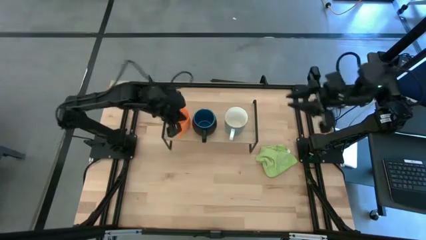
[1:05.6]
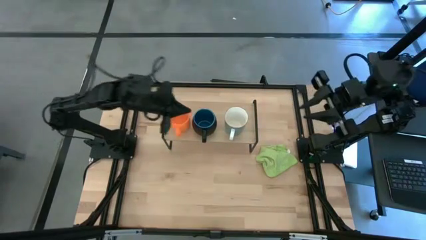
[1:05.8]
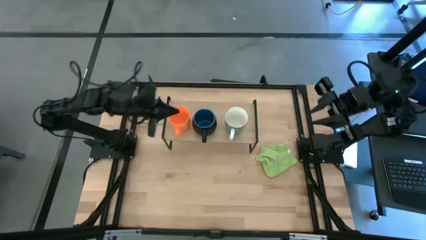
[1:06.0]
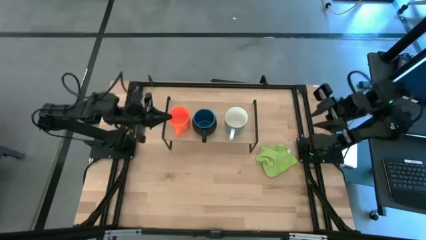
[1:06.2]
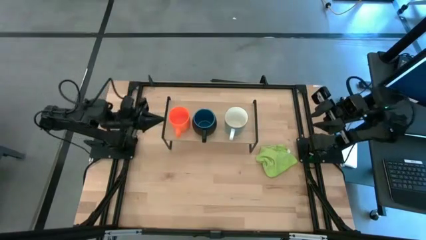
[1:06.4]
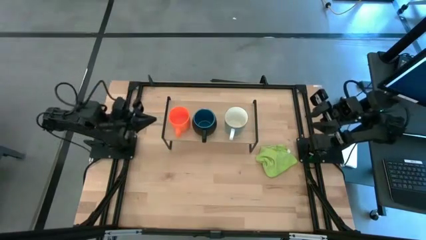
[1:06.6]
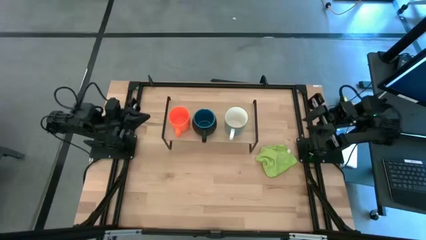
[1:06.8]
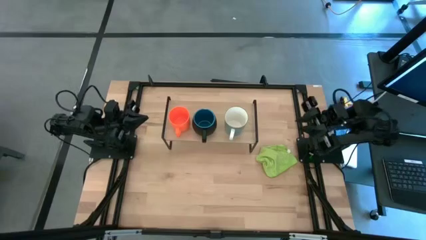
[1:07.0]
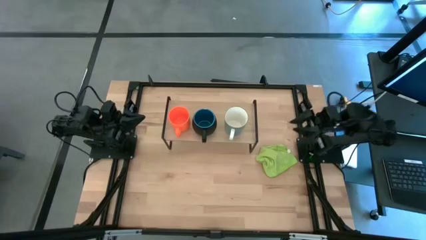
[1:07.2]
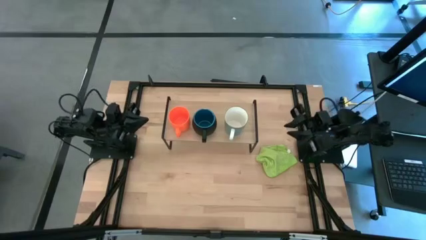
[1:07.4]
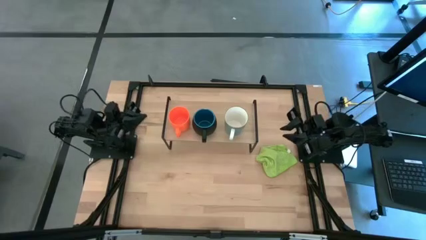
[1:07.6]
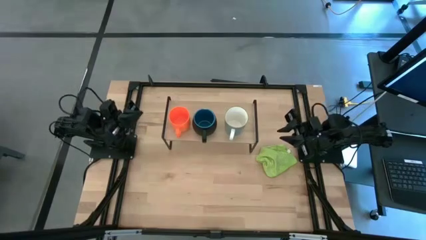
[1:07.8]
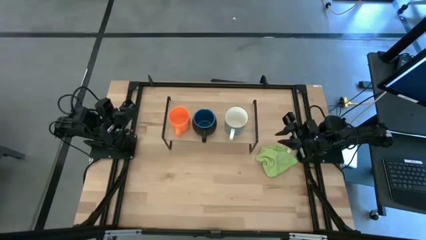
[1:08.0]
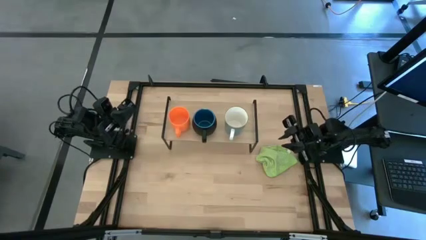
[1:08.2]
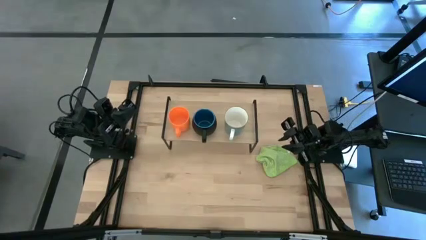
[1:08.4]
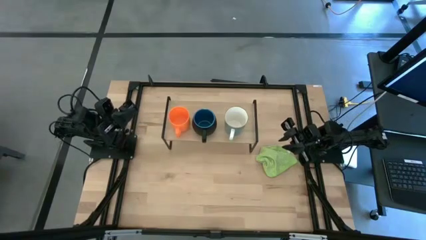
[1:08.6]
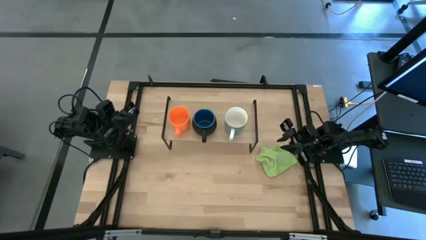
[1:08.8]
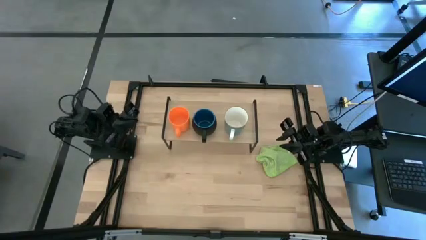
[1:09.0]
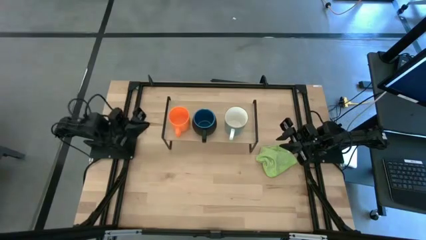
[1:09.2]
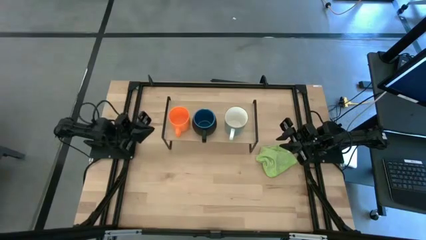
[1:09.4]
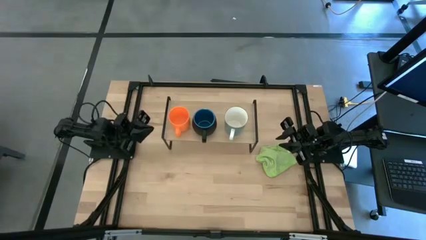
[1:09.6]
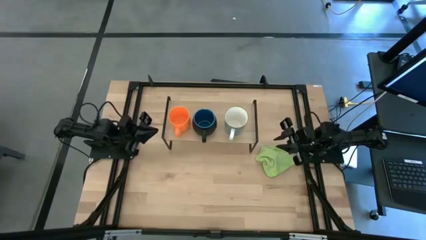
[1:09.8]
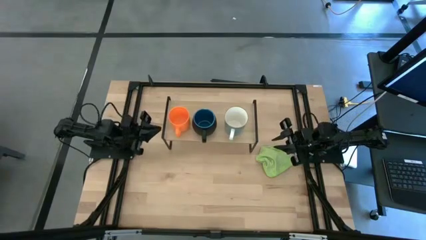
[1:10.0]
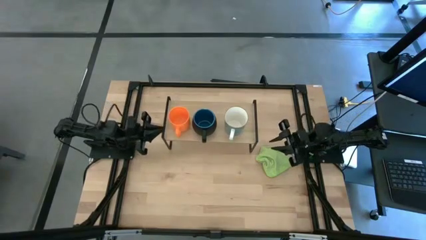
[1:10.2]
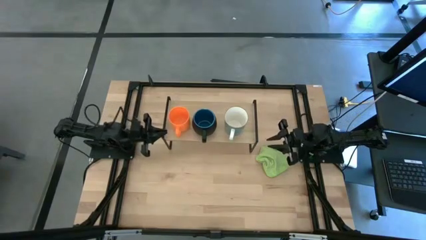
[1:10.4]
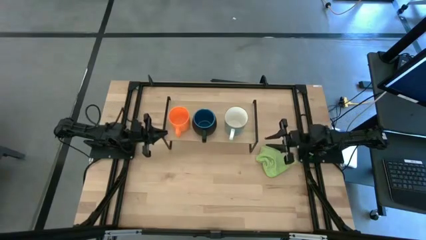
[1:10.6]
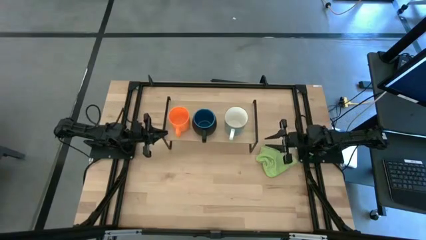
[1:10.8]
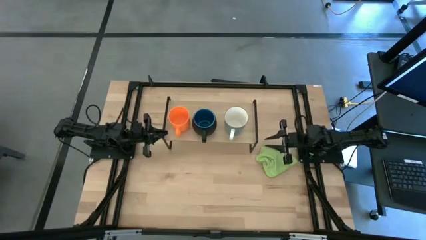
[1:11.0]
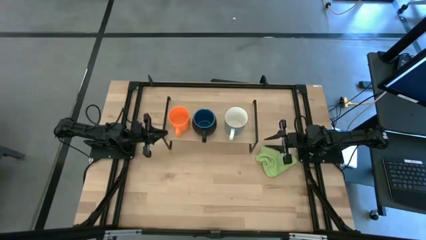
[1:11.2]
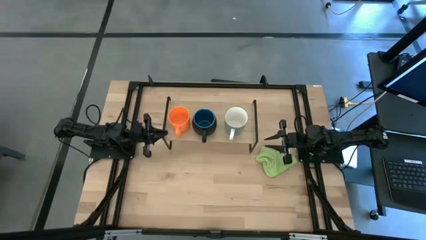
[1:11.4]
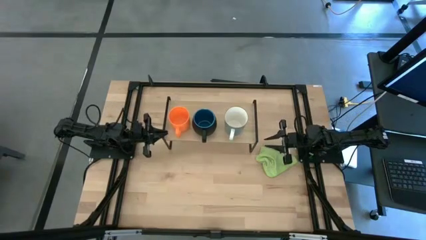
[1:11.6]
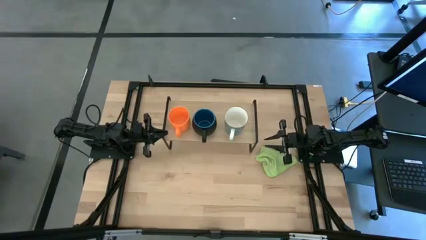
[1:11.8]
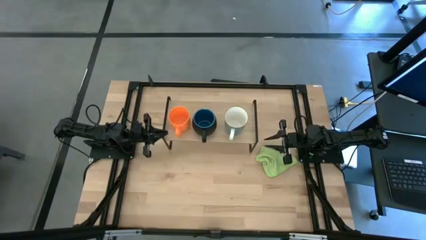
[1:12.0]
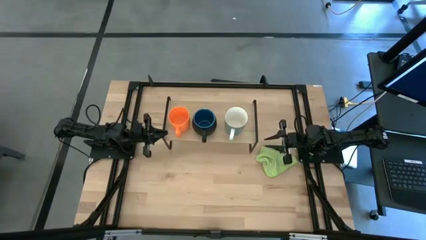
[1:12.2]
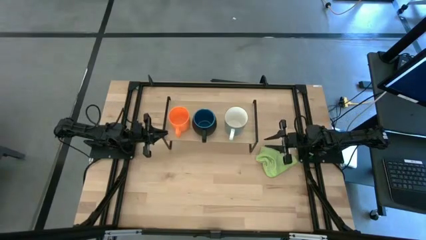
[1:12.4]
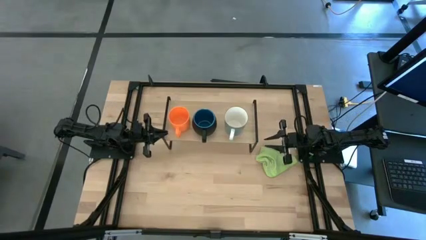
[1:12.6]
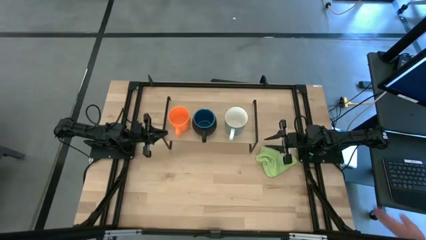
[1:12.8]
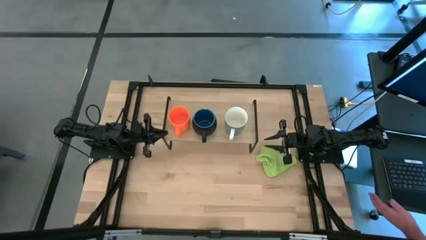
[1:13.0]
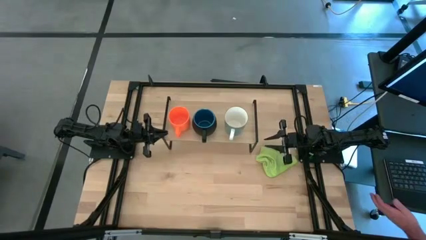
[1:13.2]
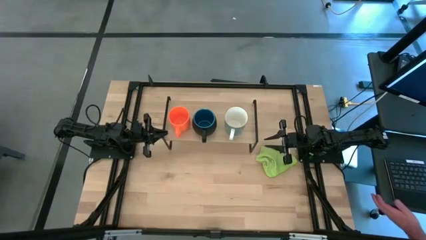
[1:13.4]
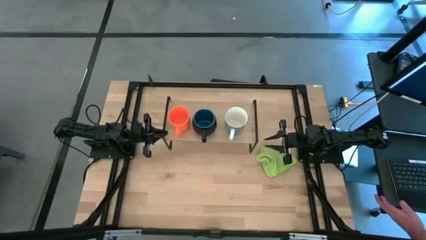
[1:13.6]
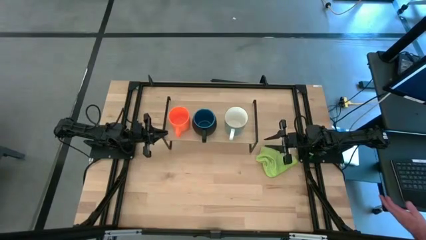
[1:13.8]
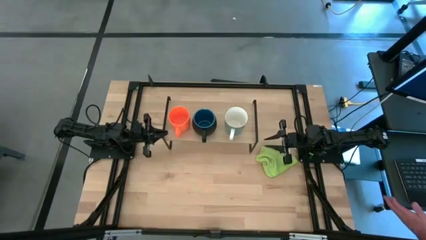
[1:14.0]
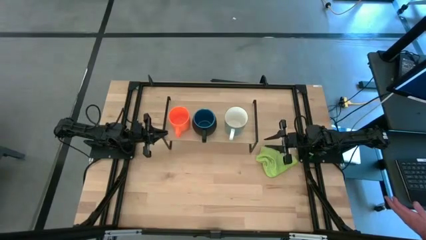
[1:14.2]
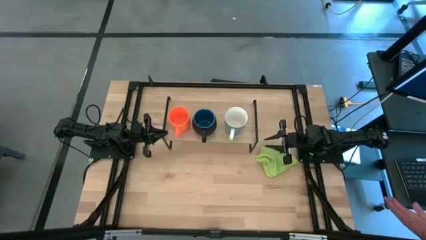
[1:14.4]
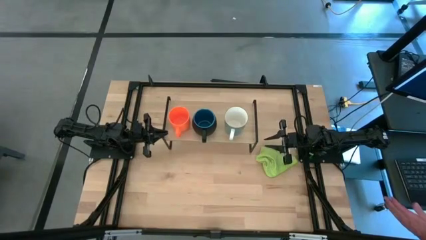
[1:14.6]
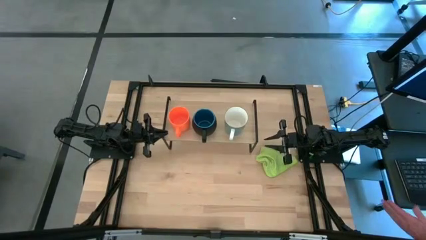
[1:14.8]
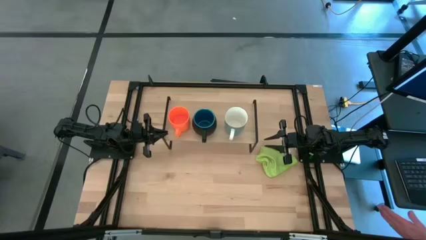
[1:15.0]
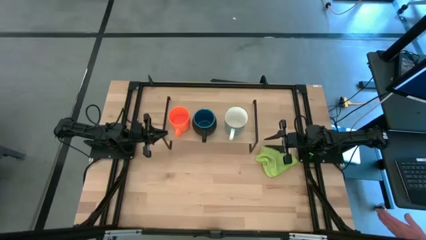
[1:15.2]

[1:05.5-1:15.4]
Task: Stack small to large cups/mugs on shelf
Return to Home Position

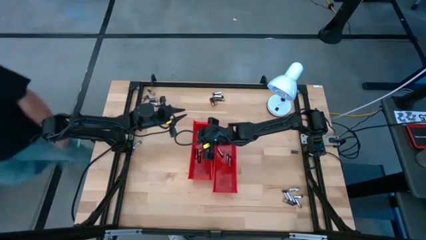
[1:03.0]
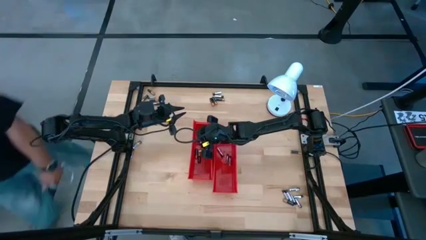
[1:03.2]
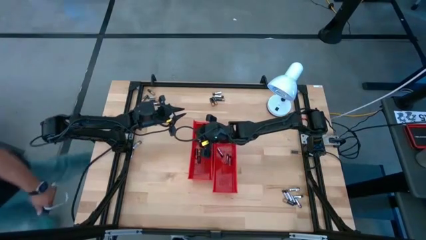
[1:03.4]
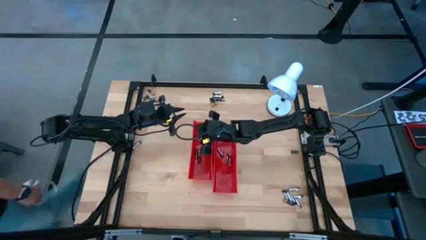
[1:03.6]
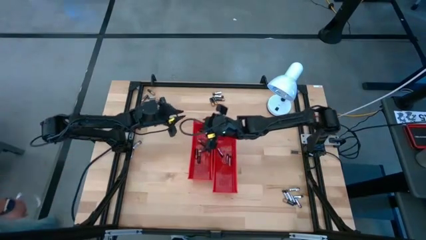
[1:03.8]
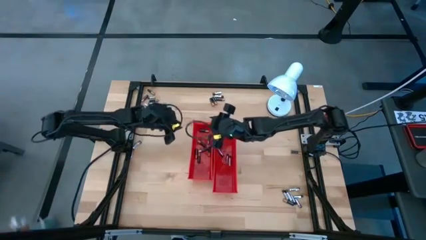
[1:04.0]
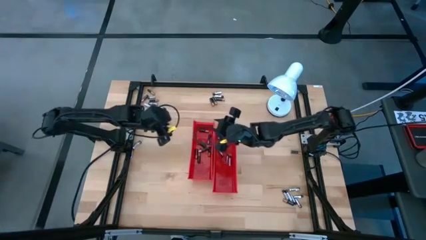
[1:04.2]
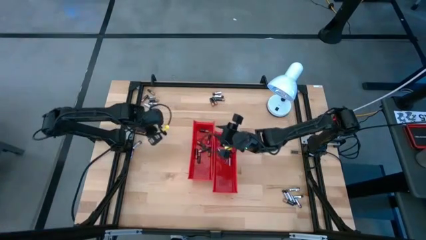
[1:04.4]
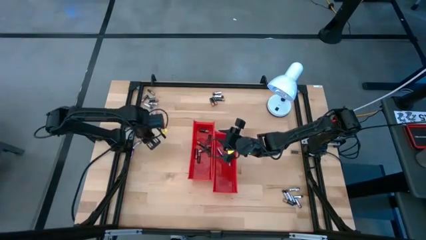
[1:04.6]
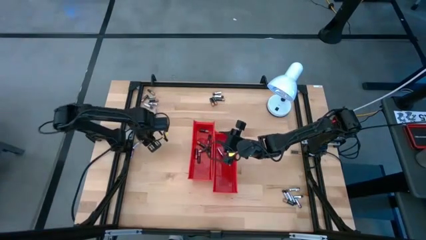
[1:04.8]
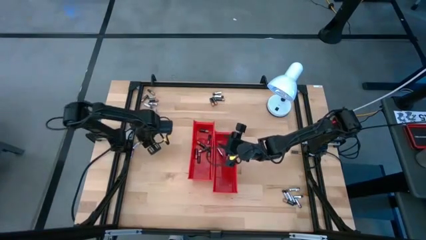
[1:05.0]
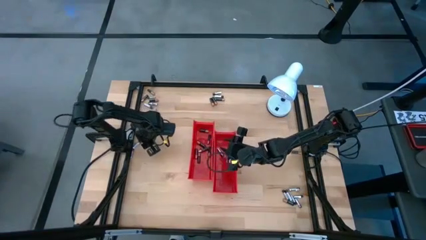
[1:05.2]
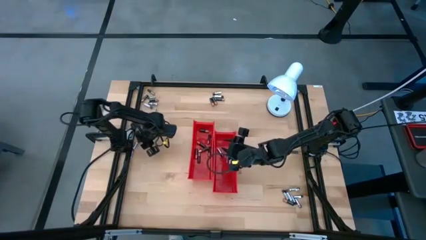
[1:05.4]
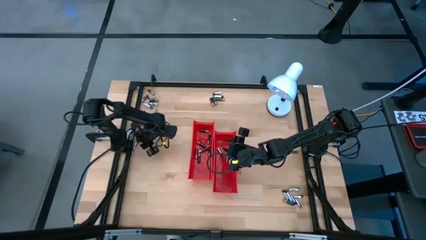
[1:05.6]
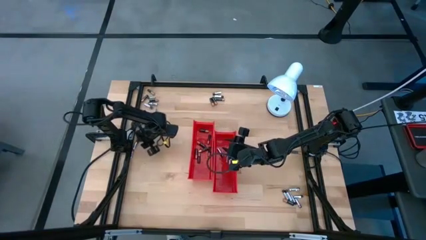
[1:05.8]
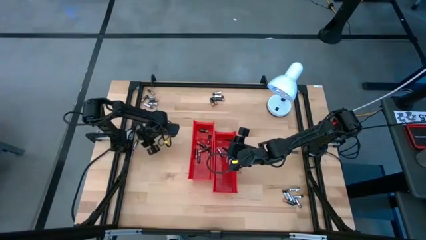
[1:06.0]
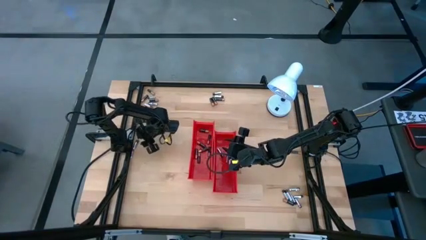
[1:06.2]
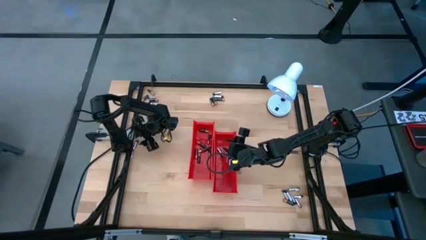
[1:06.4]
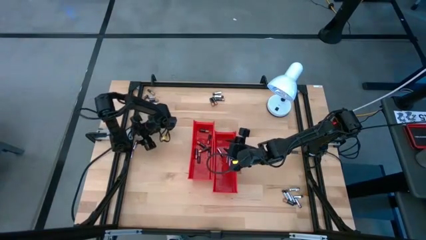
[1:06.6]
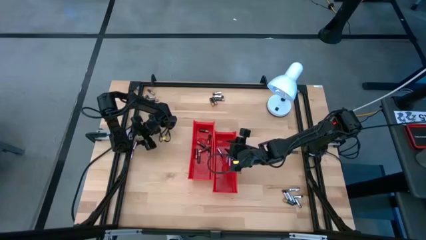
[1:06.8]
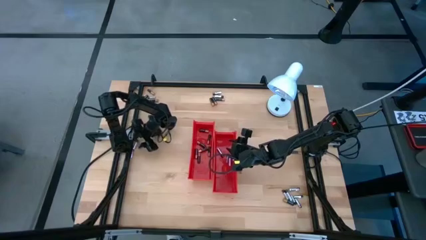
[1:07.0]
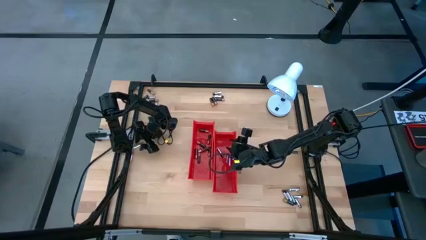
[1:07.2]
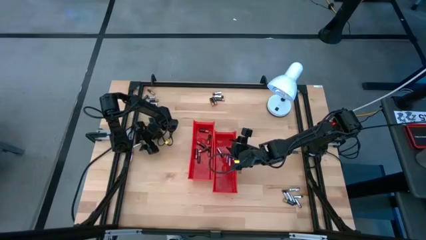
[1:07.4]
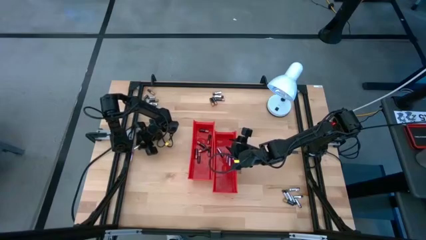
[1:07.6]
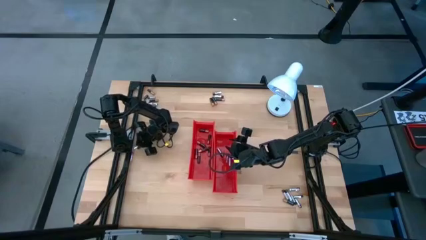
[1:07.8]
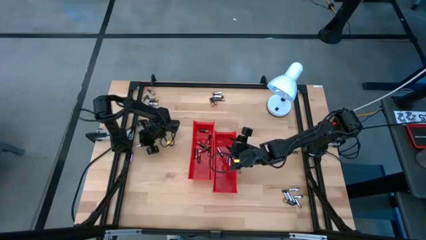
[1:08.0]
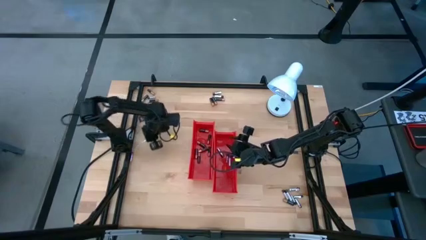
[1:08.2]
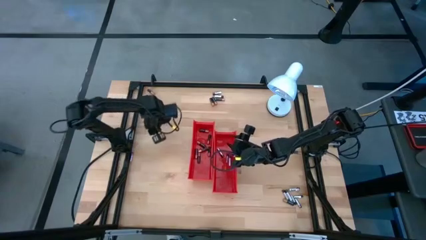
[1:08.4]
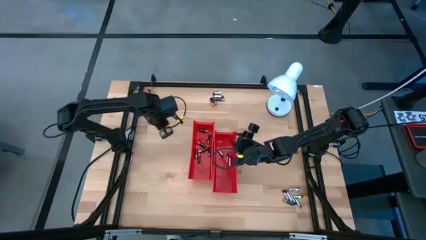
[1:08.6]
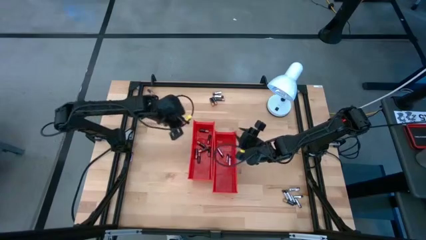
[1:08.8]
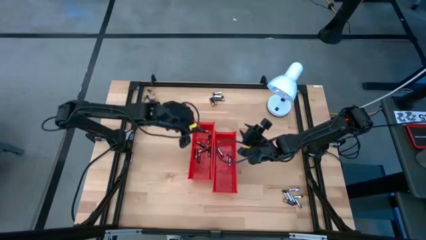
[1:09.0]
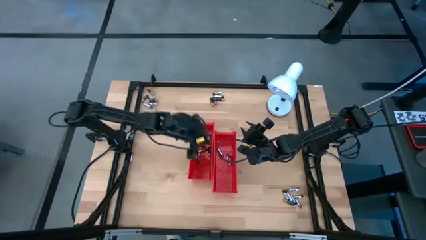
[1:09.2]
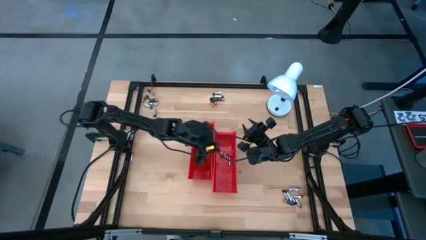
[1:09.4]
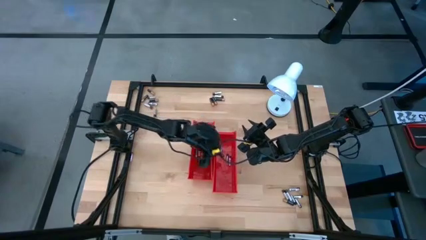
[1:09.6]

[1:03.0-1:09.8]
Task: Sort batteries
Put the silver battery into the right red bin
